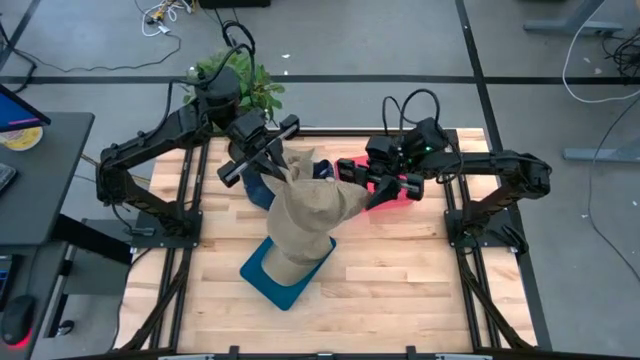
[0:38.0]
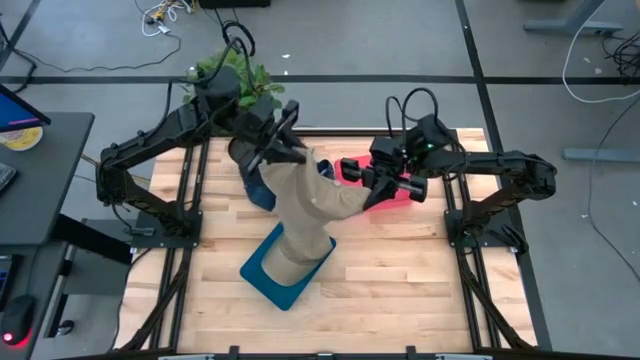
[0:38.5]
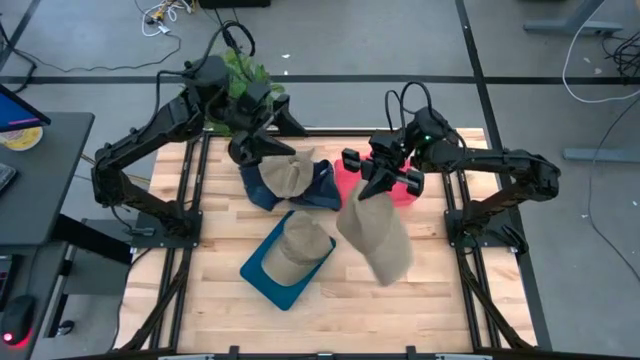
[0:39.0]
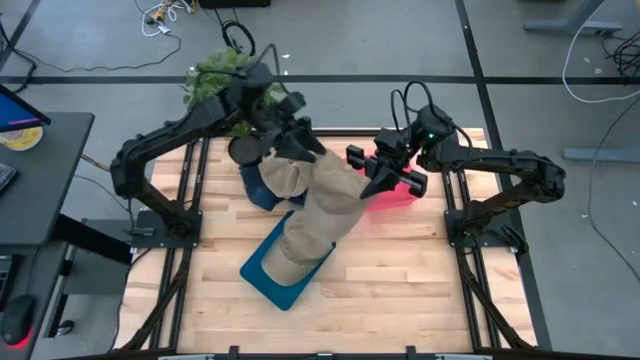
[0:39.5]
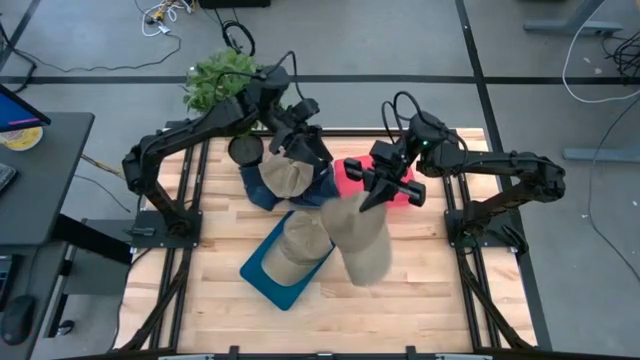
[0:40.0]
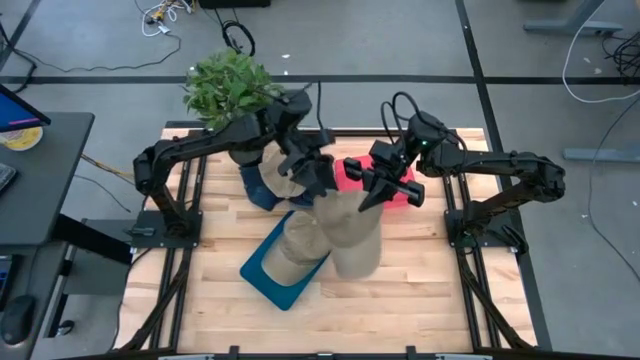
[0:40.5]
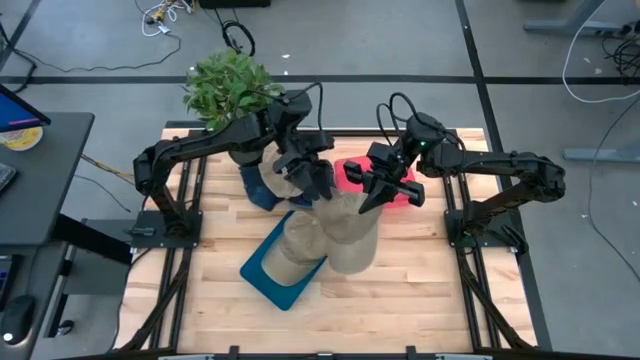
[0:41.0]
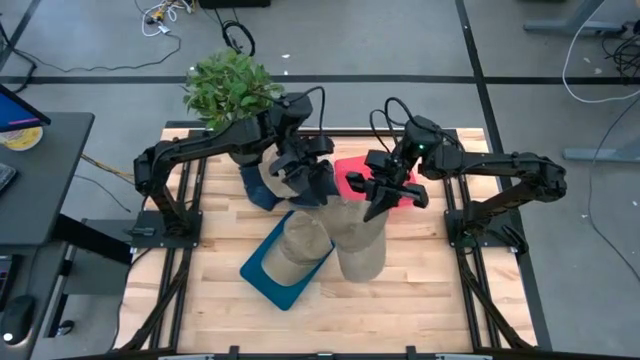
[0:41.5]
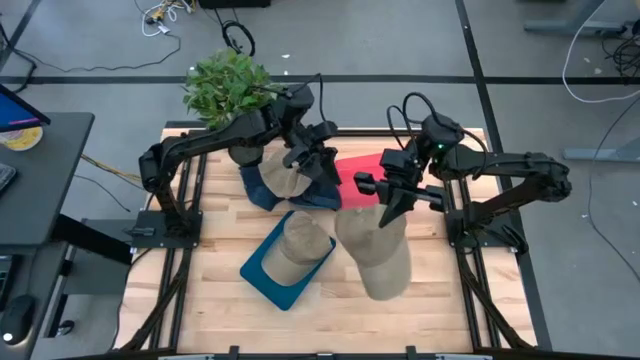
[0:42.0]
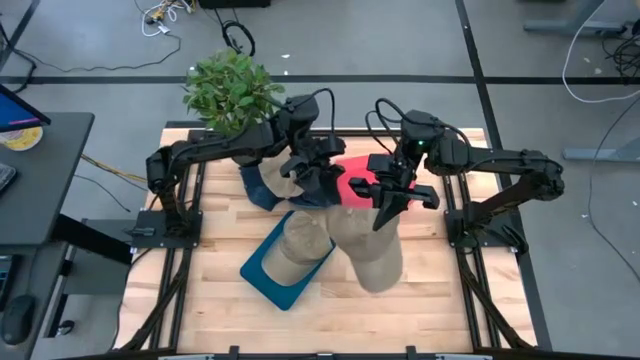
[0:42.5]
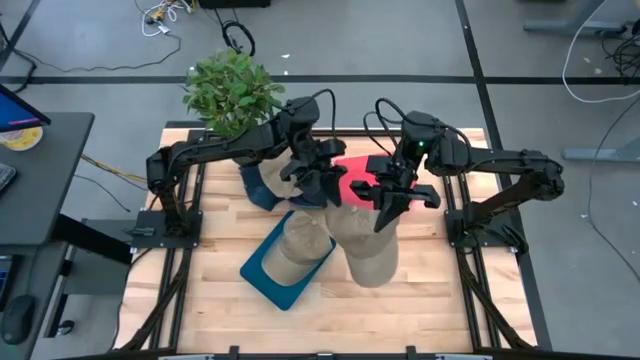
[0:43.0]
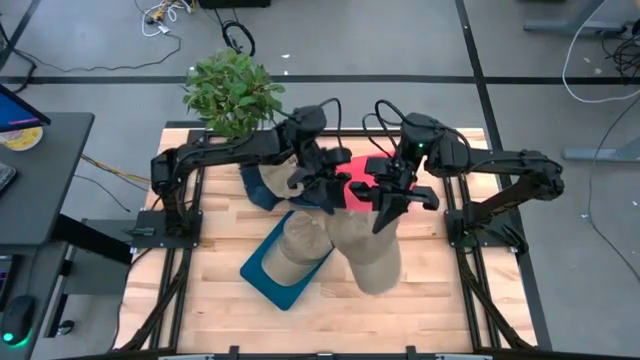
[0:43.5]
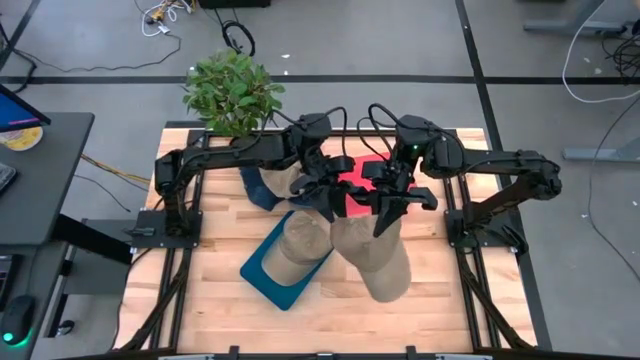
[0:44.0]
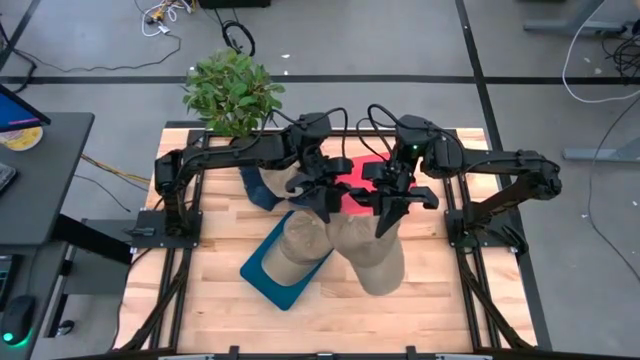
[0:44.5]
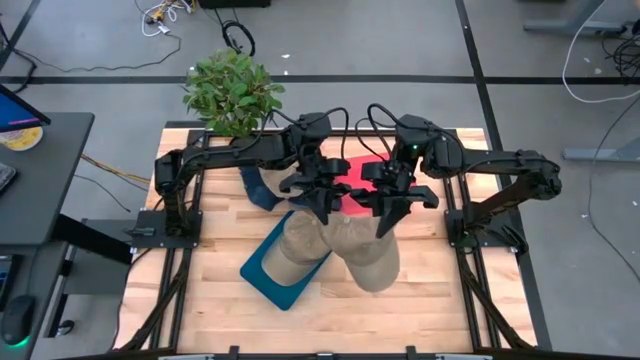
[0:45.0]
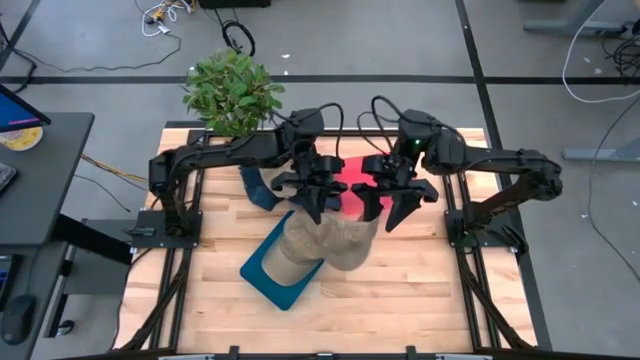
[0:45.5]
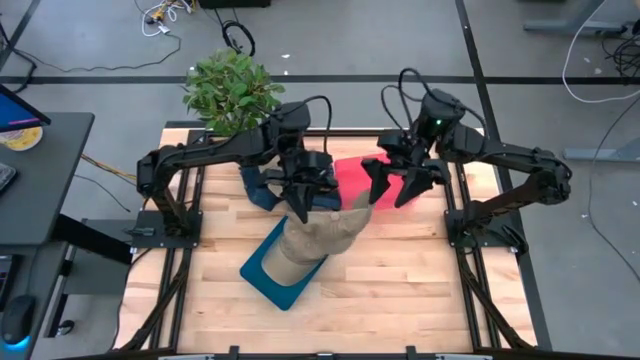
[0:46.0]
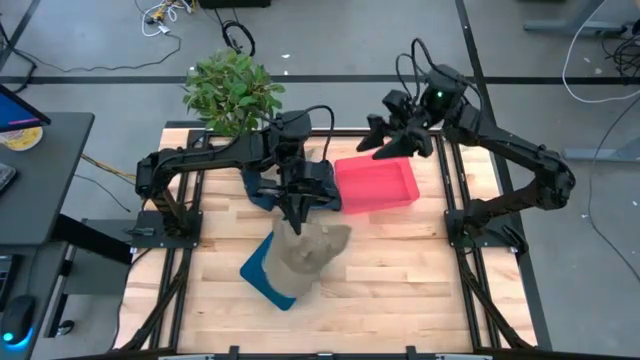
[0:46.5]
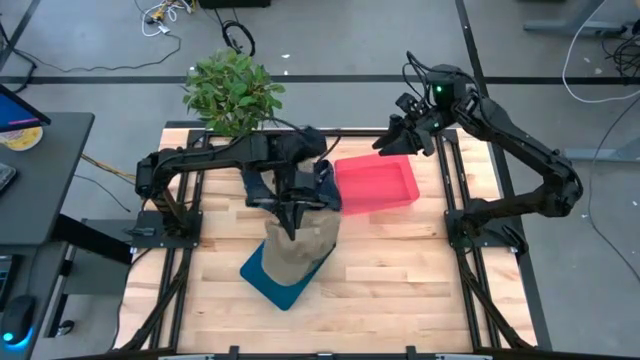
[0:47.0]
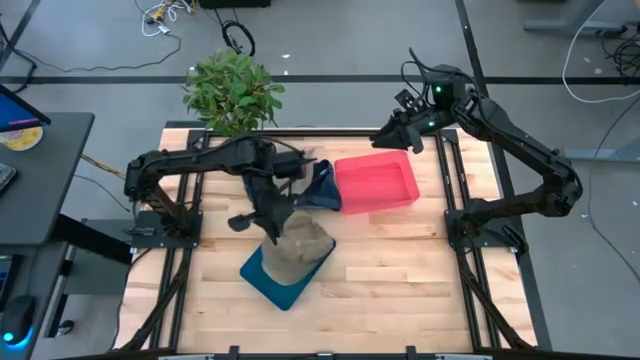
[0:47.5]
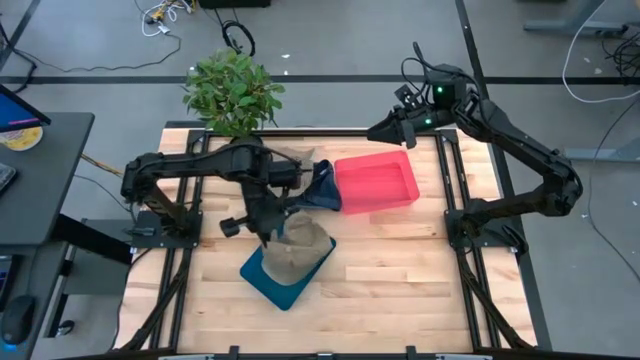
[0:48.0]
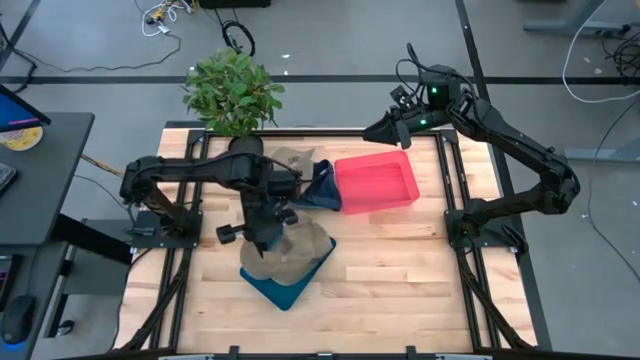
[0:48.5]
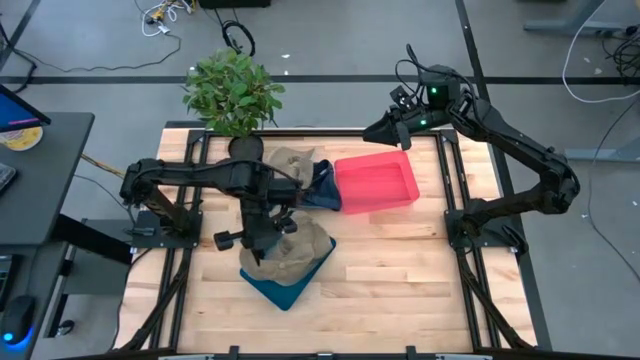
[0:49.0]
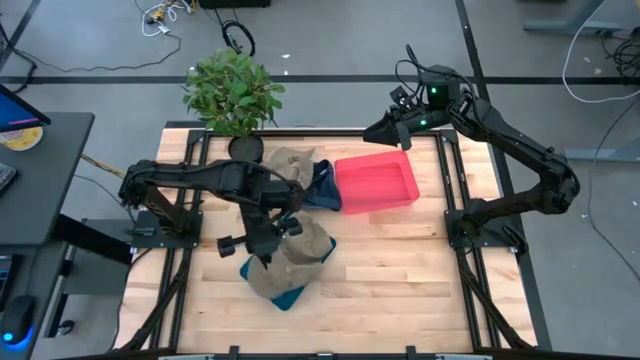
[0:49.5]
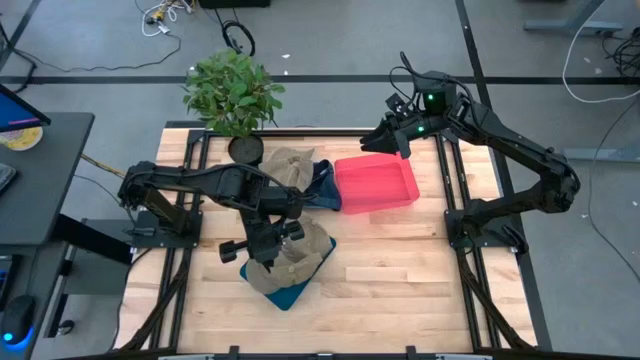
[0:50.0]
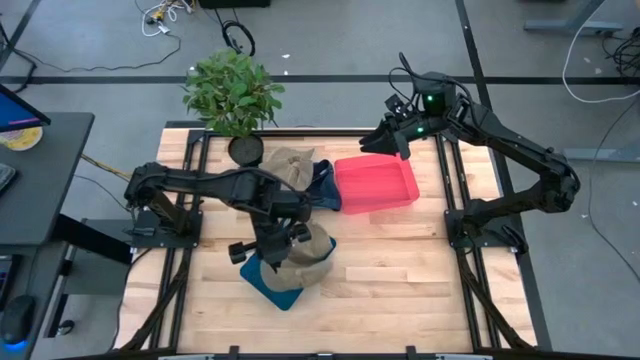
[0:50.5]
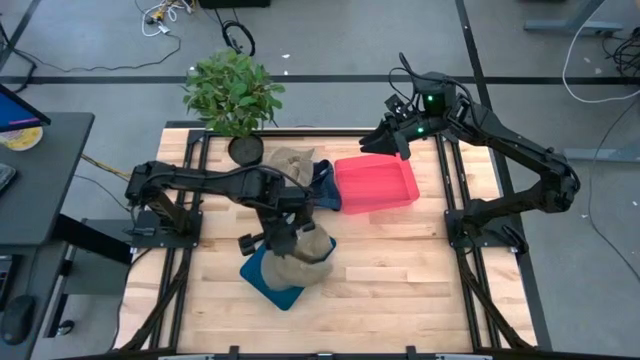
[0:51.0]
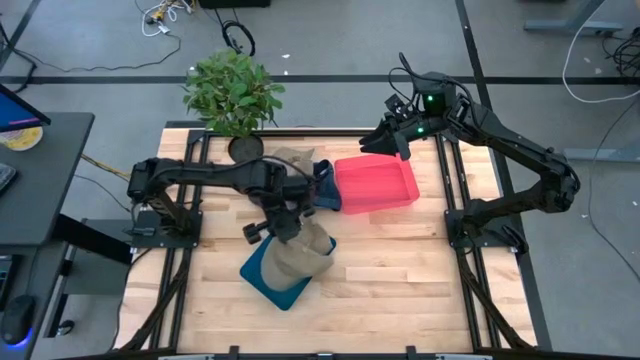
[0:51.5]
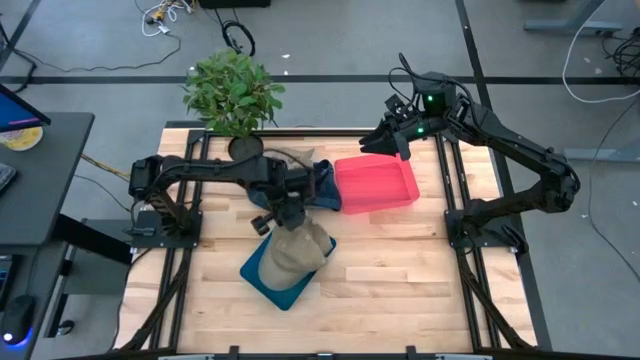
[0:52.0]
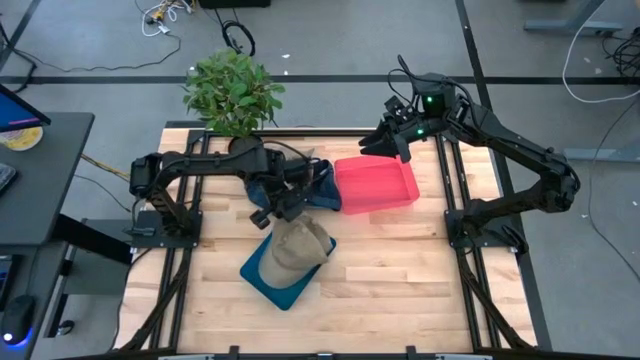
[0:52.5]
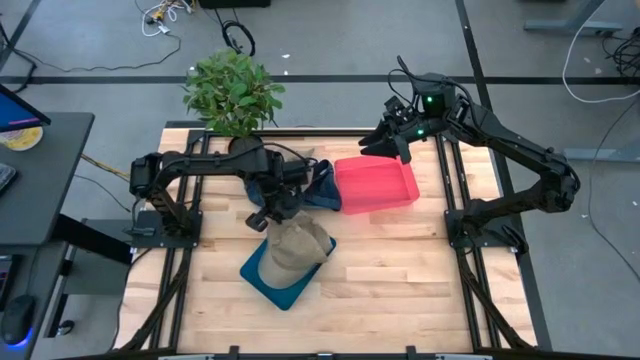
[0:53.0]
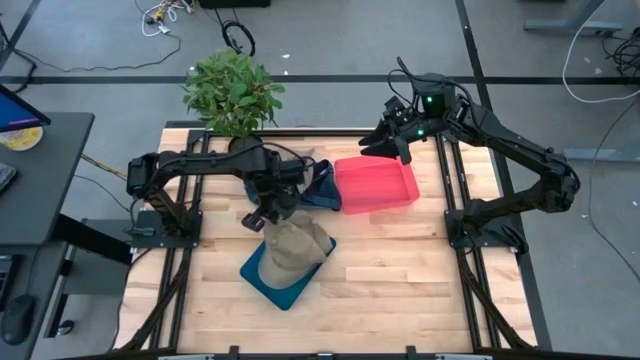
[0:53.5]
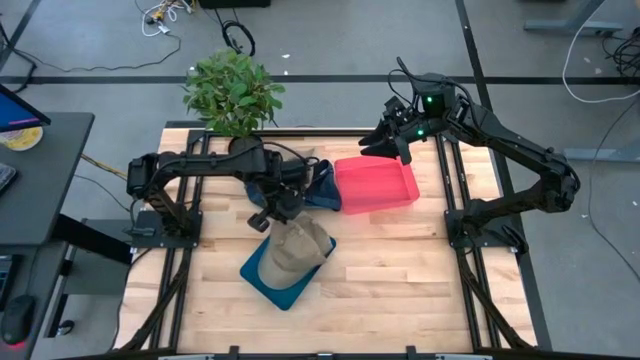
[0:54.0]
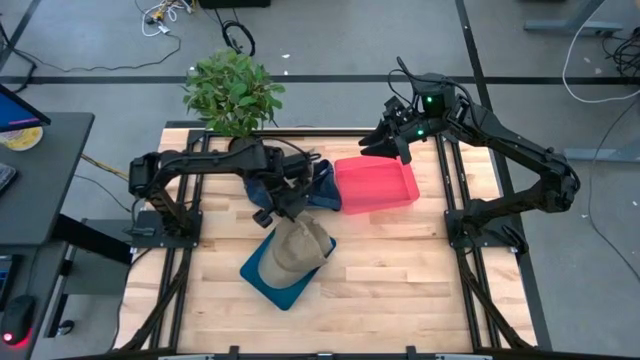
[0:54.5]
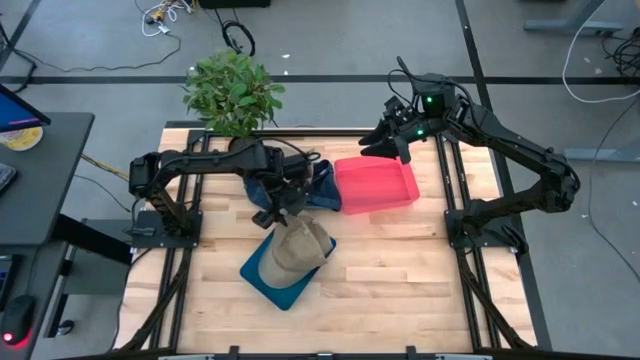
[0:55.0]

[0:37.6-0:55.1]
Task: Pick & Place hat
Put the left brown cap into the blue bin

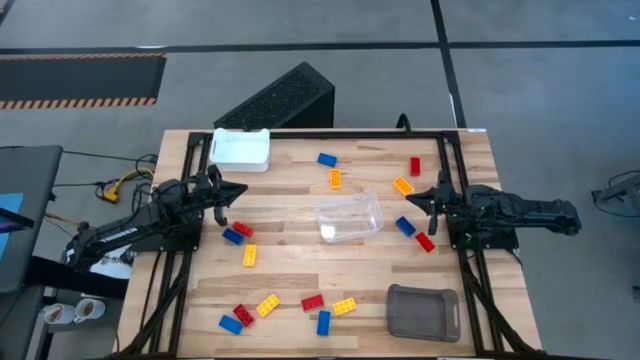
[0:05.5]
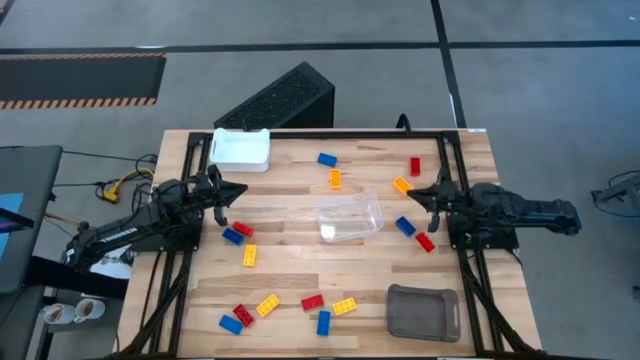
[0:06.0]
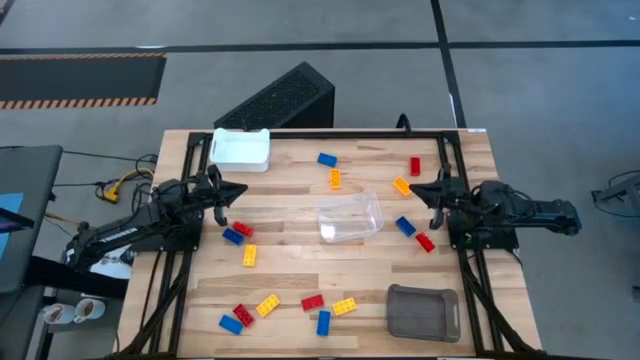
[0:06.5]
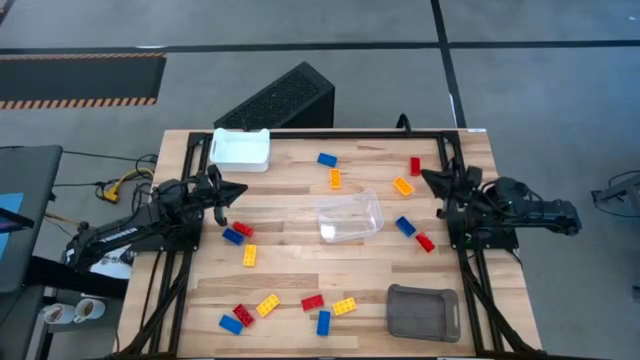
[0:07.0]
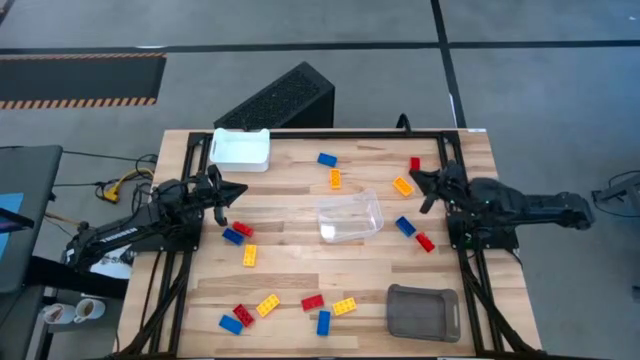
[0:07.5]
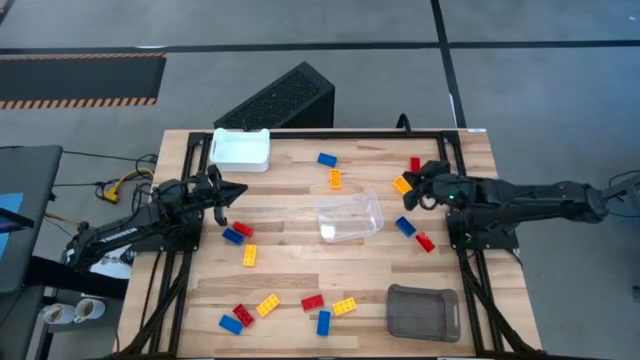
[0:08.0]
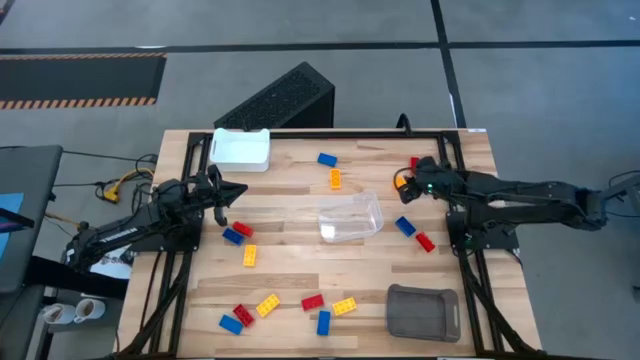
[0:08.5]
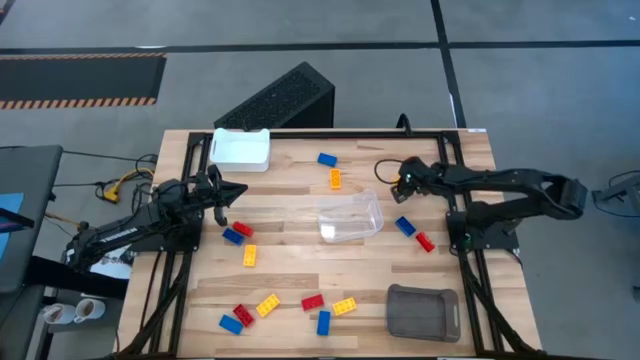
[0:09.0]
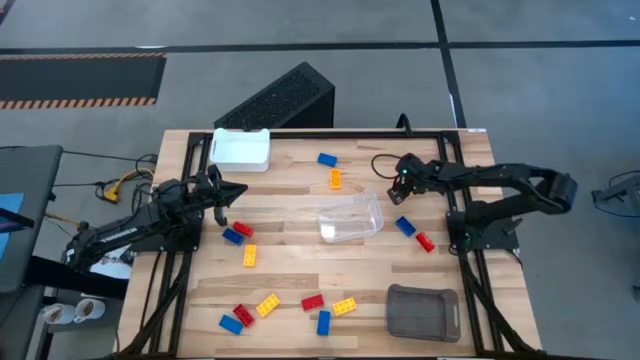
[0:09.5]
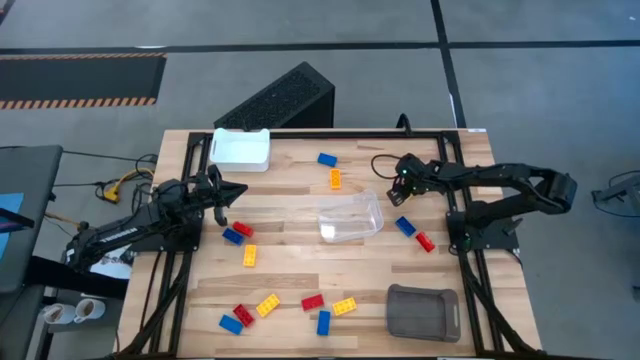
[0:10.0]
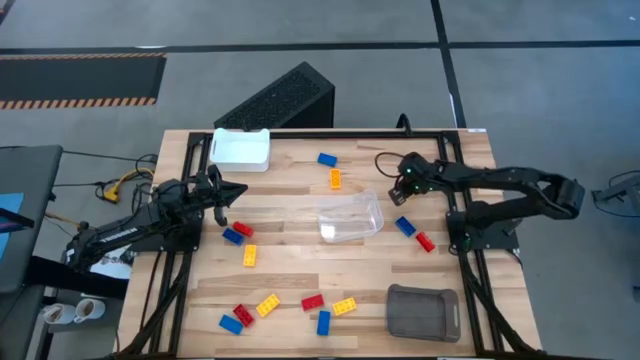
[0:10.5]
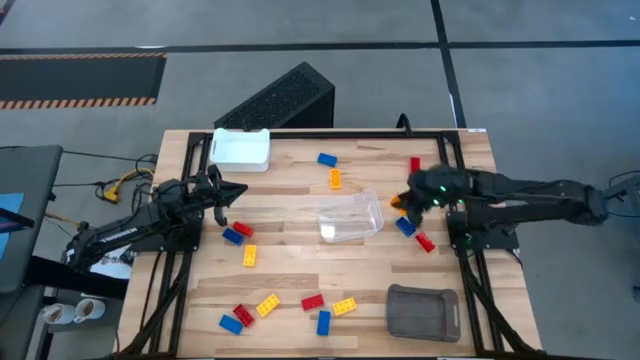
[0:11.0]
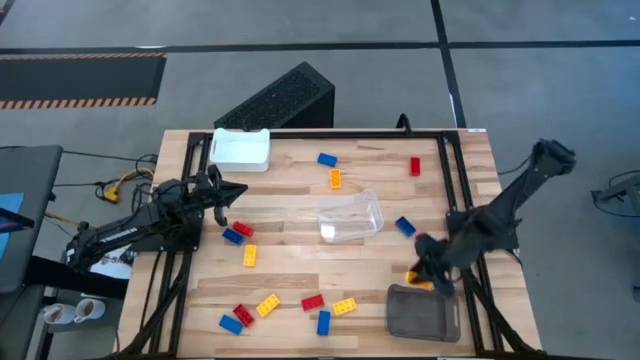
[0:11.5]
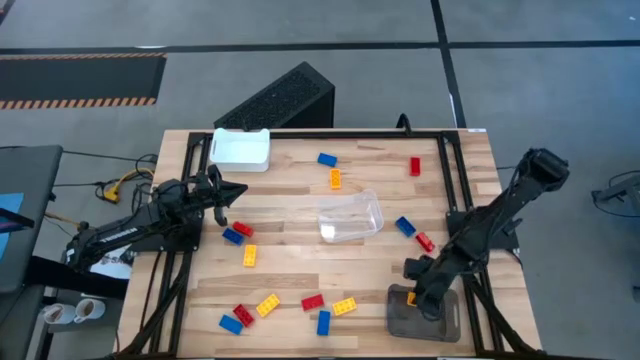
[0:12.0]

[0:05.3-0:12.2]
Task: Sort & place blocks by color
Put the yellow game piece into the black bin
